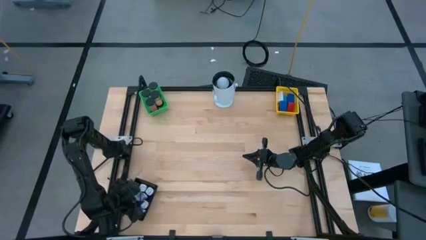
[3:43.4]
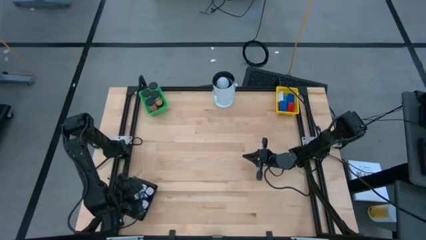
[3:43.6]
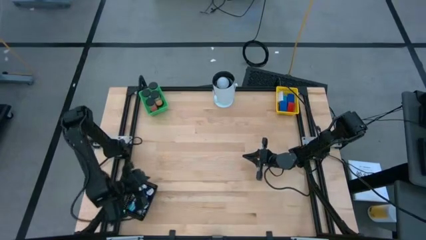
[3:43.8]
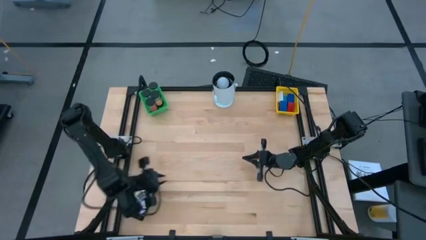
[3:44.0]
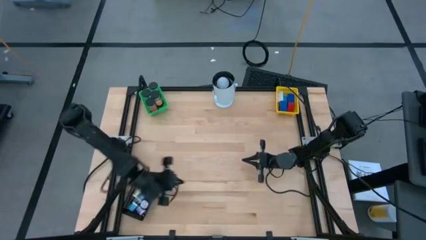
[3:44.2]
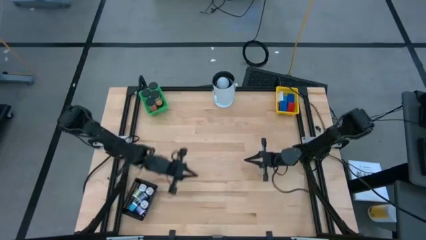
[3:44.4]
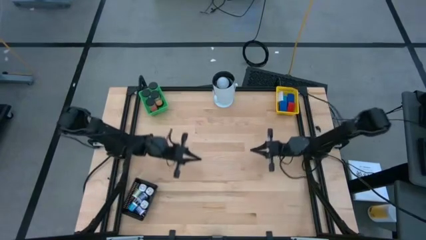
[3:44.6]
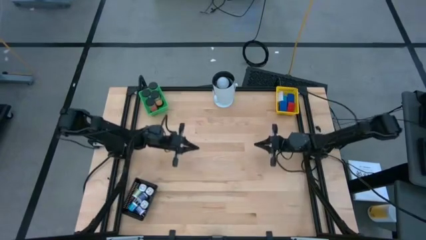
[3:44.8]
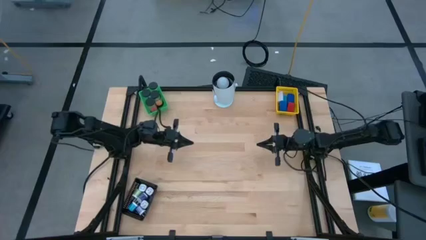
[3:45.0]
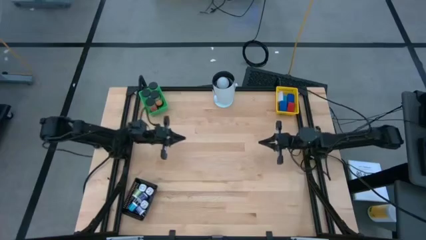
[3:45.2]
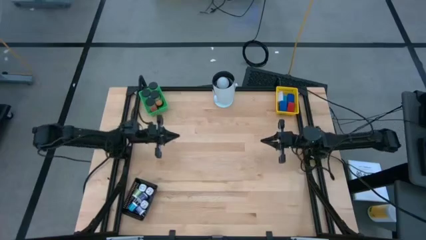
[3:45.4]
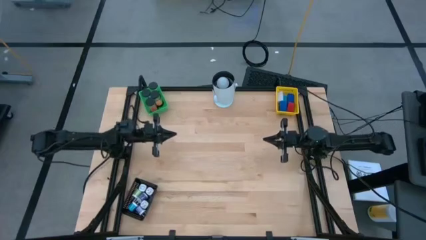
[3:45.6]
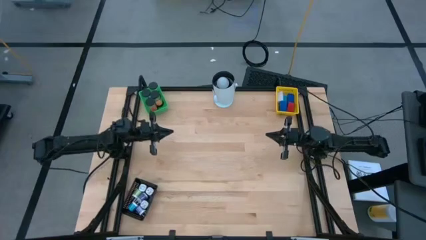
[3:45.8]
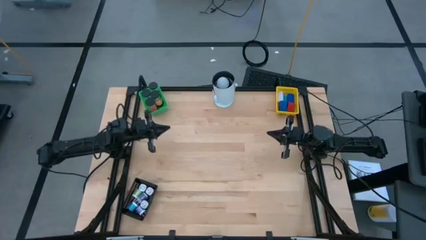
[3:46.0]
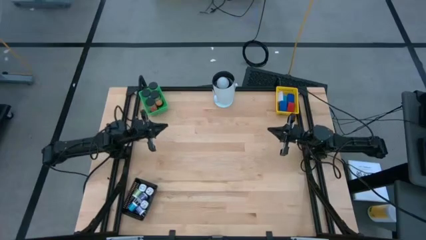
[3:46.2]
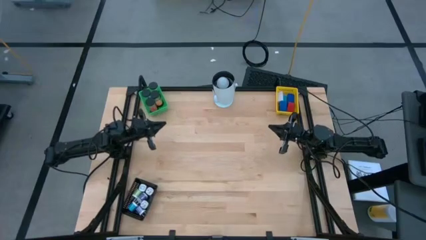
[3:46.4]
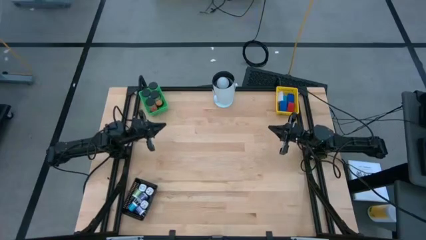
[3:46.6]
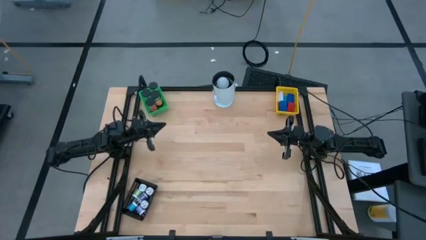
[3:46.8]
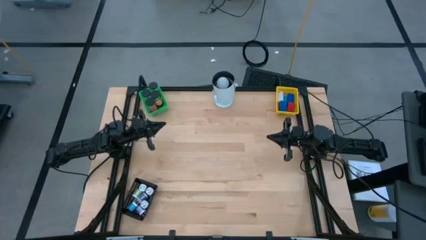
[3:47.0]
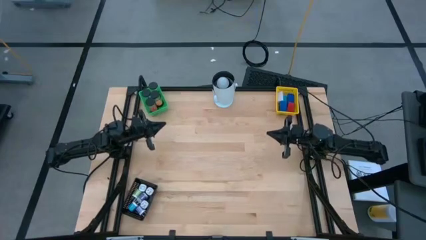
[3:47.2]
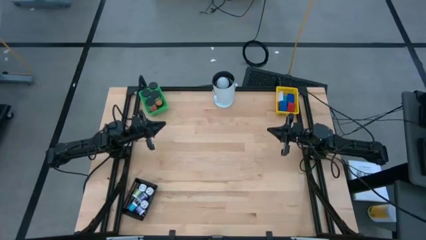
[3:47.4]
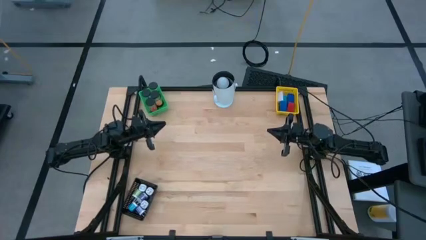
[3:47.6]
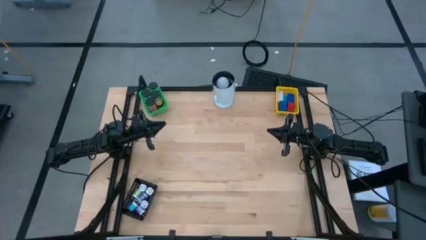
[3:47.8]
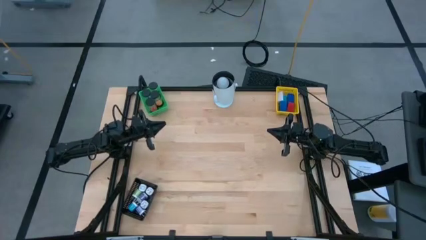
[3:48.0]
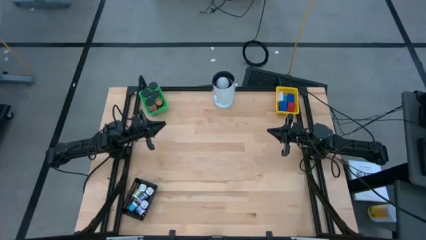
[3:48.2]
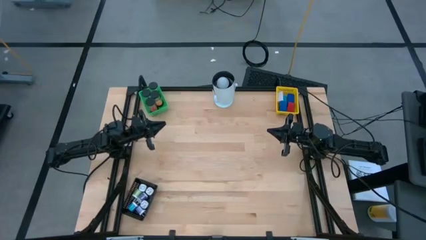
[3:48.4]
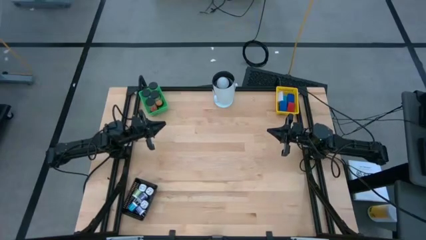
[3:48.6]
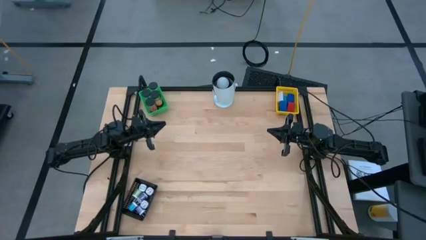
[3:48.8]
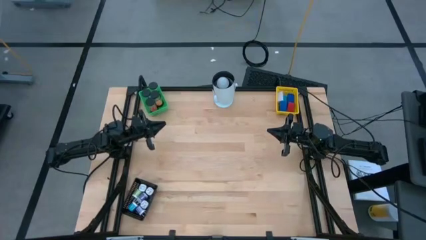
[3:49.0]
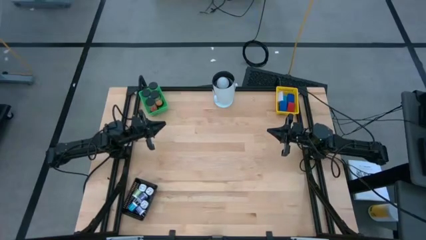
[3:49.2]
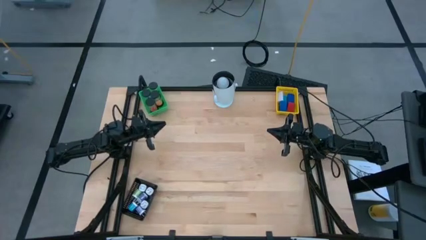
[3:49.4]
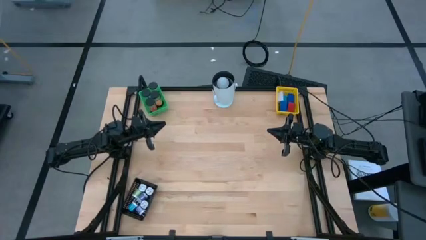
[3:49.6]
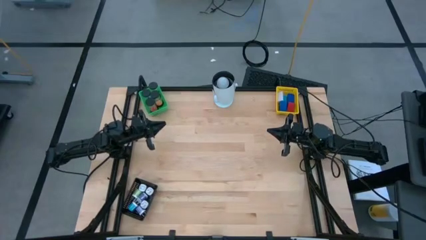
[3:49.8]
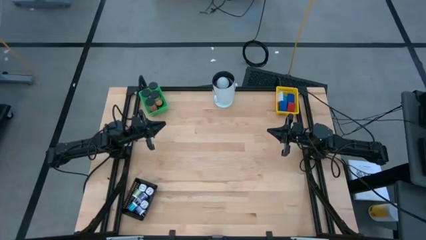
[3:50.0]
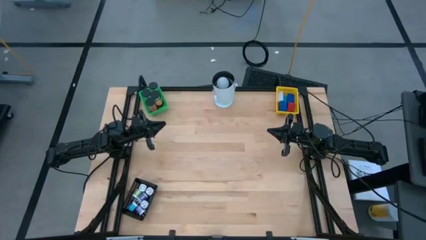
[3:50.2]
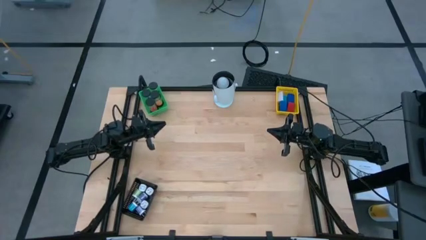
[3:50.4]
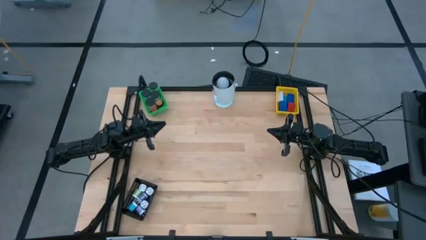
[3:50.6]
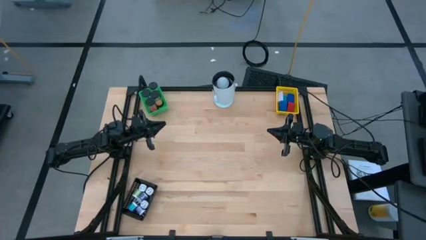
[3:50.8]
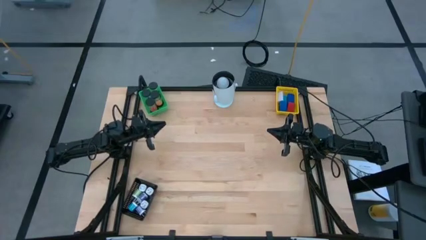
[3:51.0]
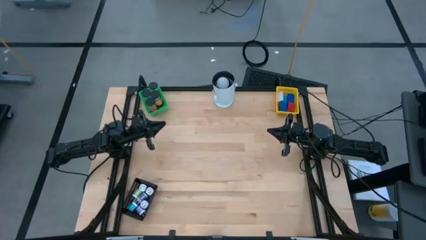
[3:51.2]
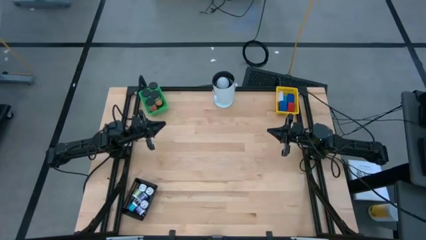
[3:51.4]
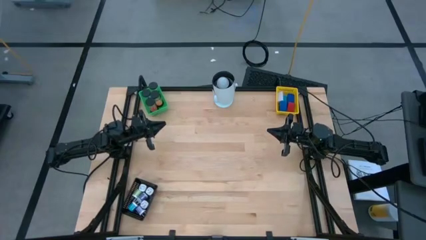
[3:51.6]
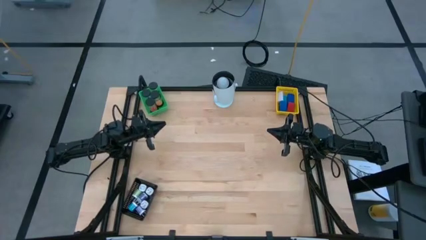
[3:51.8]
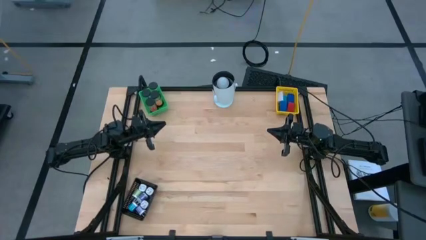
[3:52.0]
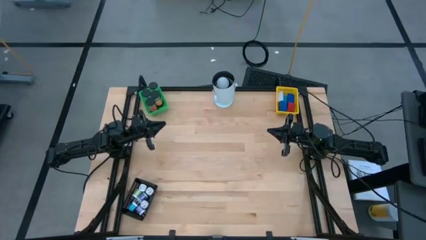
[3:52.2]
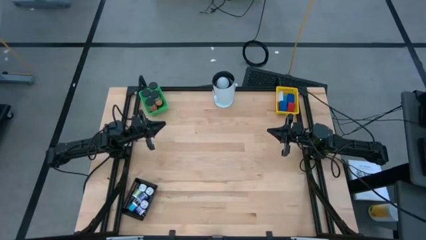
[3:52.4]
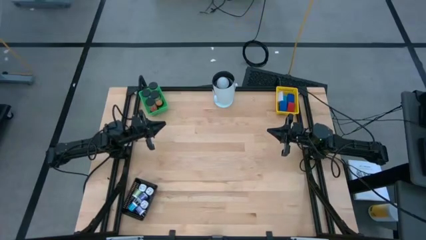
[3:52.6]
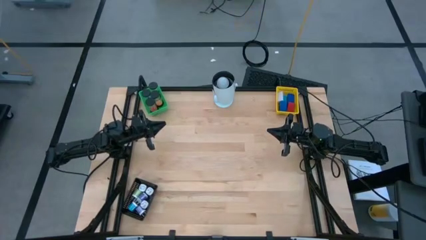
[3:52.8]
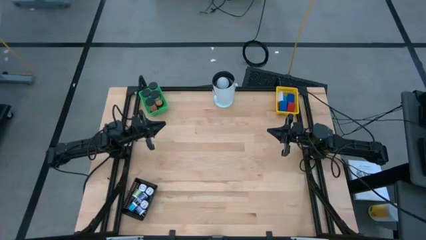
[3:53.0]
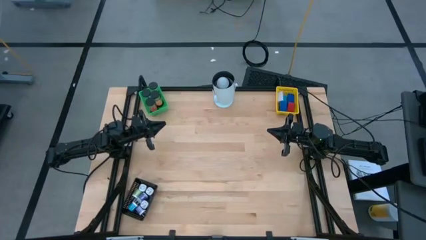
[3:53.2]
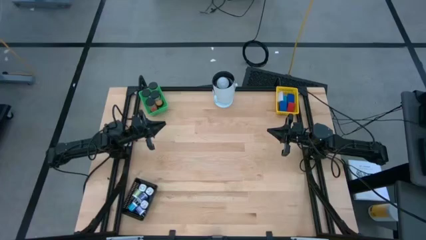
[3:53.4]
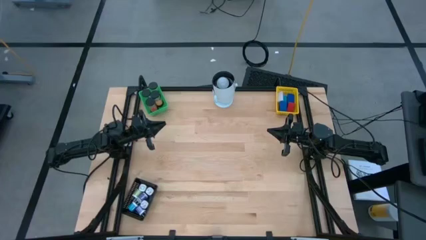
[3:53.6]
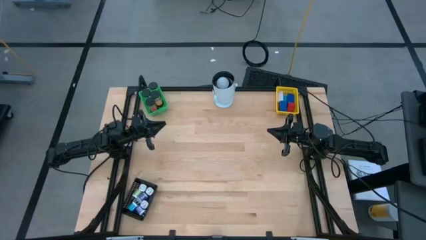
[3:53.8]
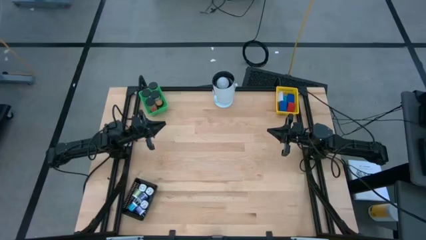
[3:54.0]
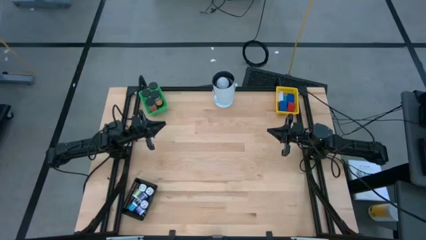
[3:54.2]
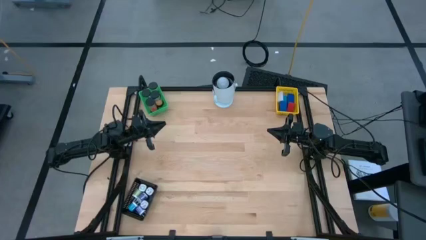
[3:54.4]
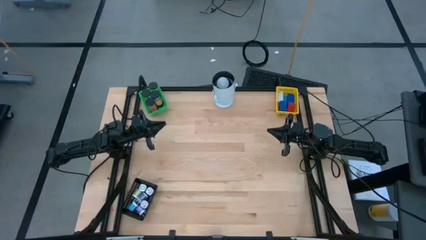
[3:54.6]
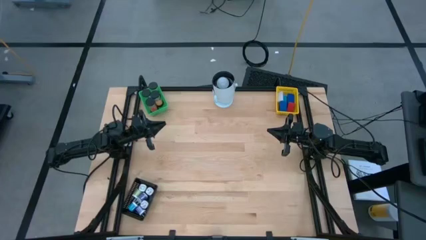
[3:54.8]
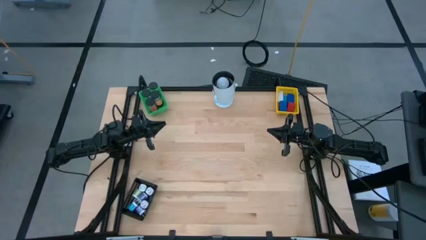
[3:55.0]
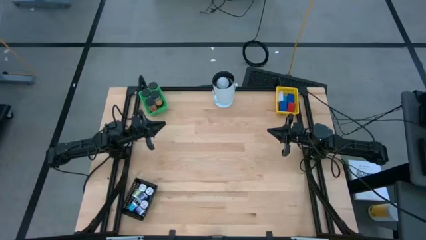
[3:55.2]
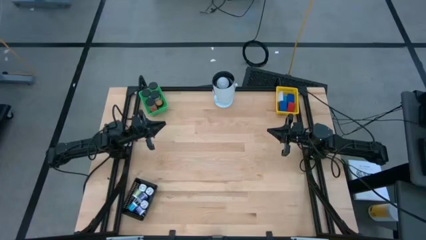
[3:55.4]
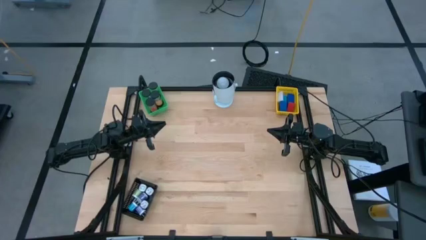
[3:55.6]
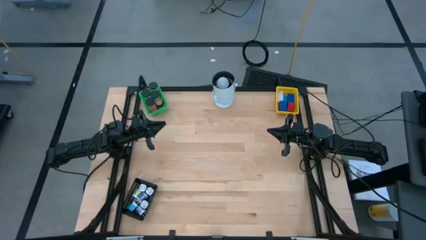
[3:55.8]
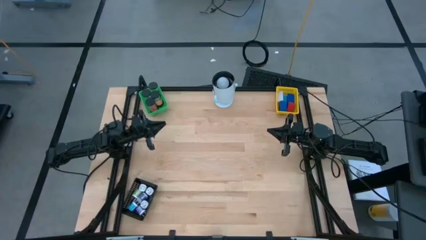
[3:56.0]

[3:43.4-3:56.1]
Task: Pick & Place Office items
Return to Home Position

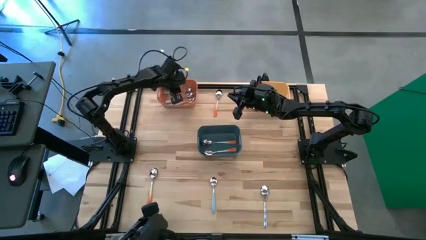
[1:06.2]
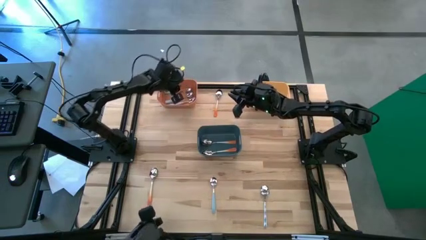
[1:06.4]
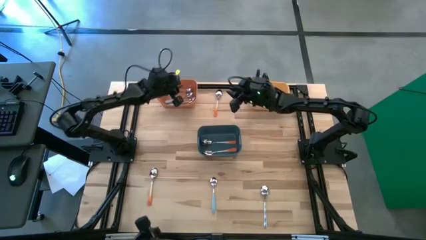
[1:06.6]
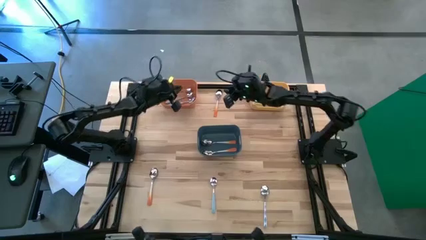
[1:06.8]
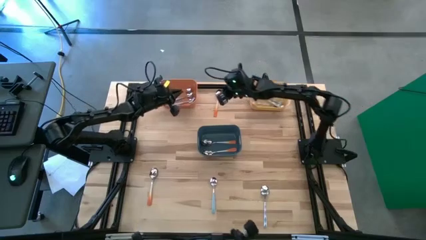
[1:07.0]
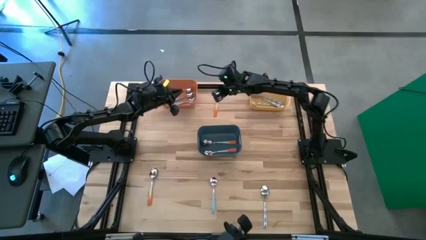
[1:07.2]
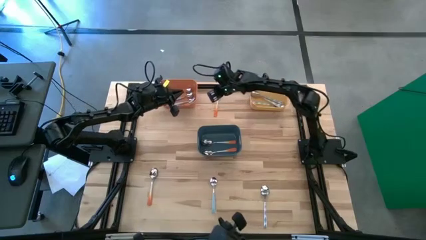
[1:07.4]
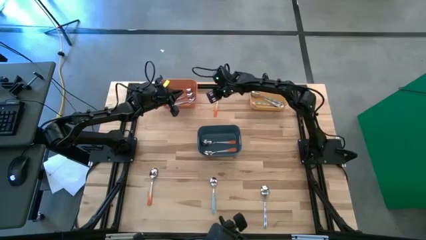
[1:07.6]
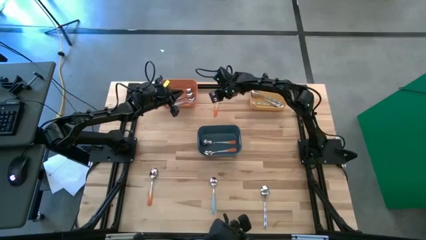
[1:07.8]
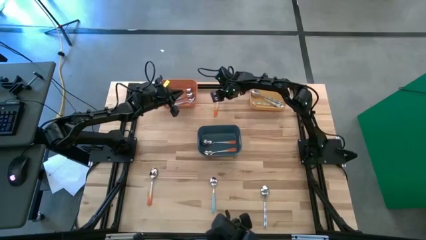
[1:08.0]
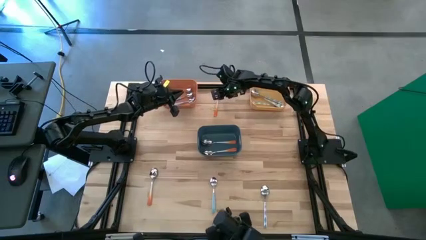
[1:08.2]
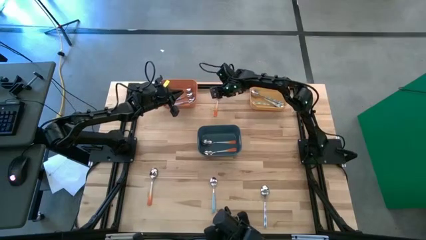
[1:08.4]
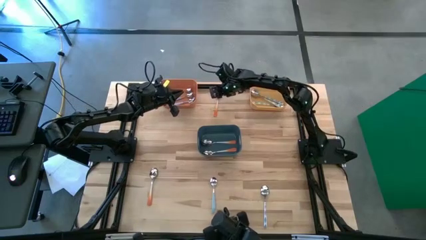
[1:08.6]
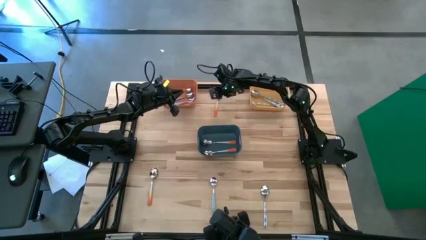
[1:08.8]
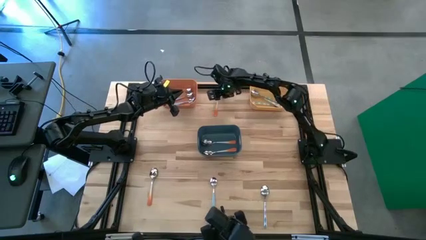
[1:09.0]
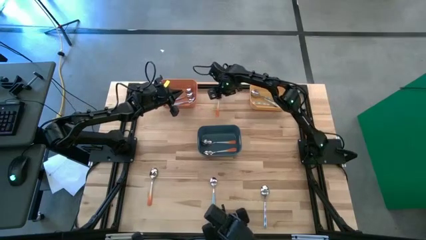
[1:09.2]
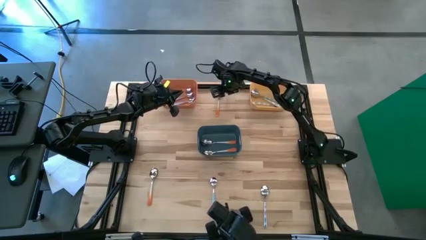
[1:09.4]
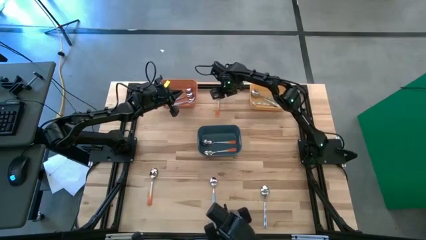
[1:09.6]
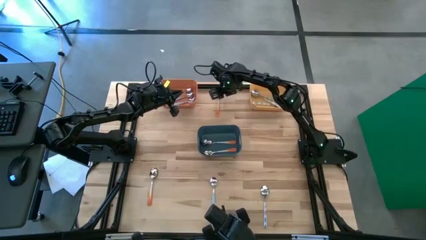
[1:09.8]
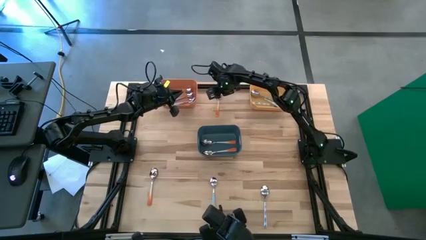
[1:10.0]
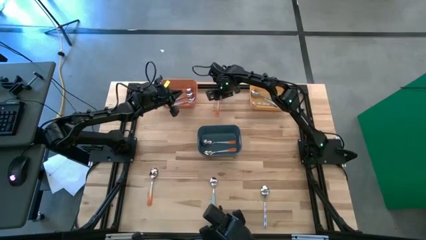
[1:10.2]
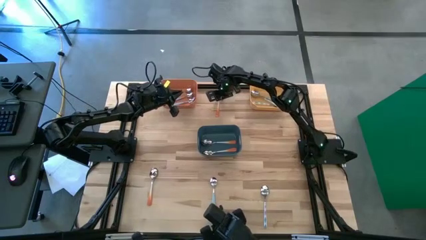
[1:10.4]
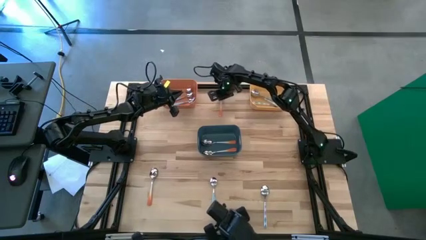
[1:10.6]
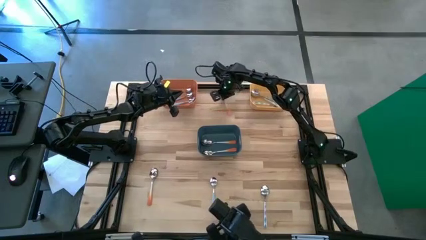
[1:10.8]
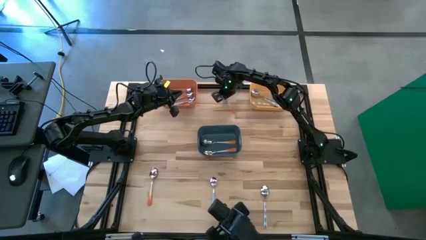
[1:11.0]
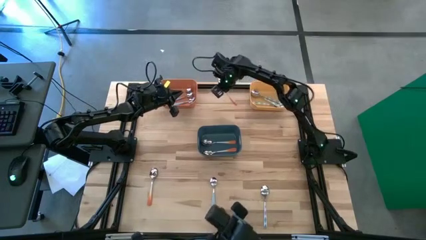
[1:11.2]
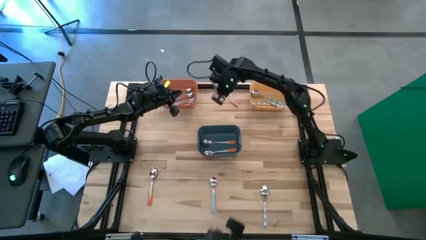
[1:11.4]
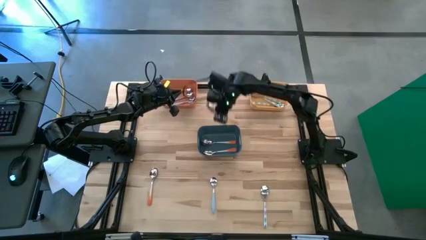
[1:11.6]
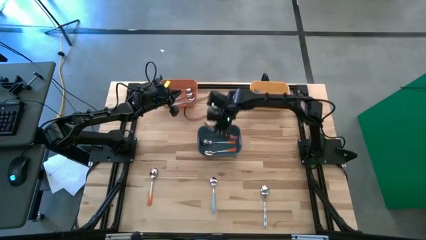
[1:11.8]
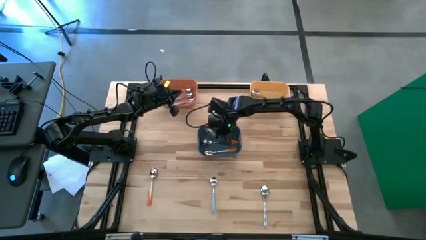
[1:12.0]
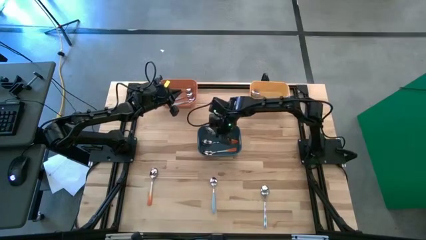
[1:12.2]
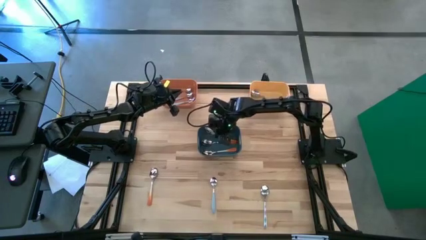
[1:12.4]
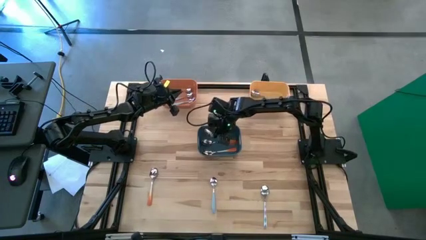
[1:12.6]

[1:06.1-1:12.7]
Task: Sort silverware by color (type)
Put the orange spoon into the blue bin
